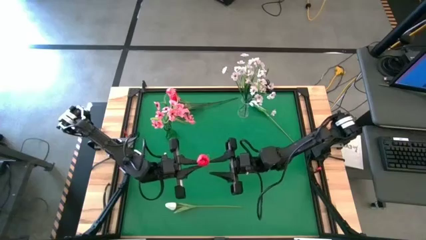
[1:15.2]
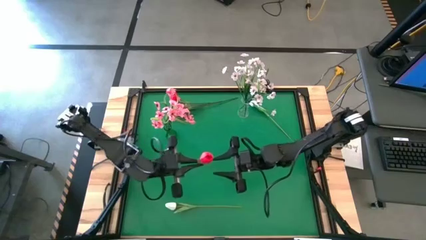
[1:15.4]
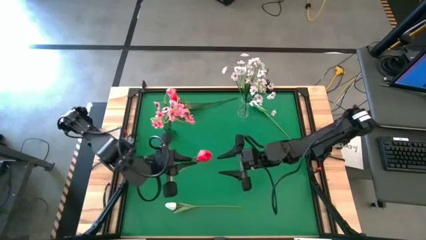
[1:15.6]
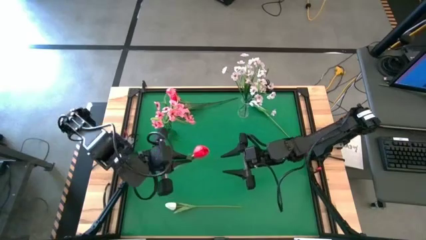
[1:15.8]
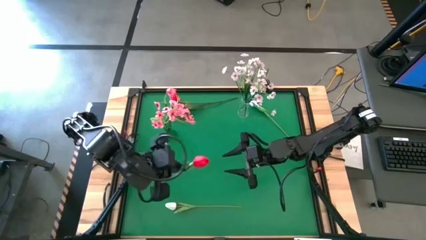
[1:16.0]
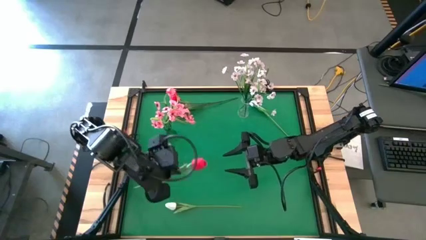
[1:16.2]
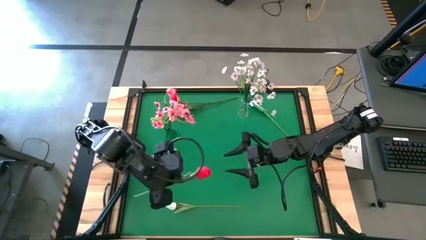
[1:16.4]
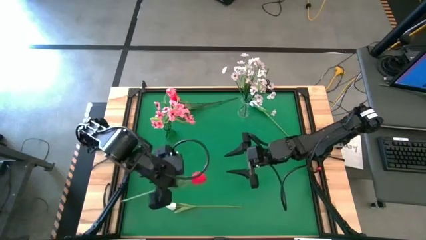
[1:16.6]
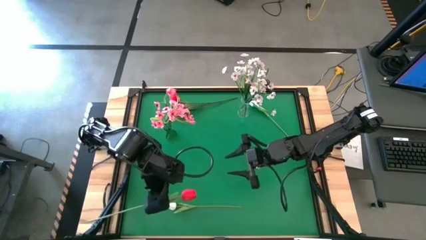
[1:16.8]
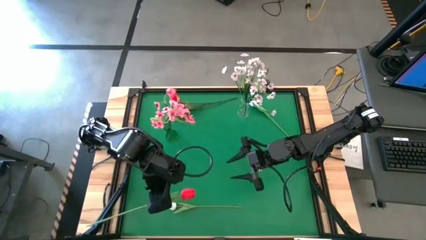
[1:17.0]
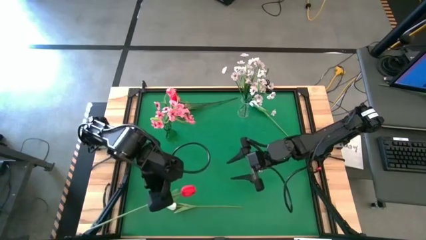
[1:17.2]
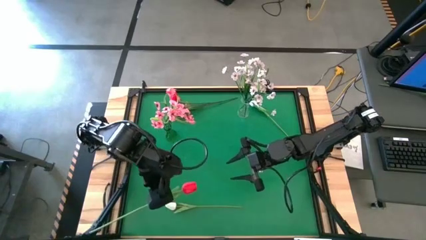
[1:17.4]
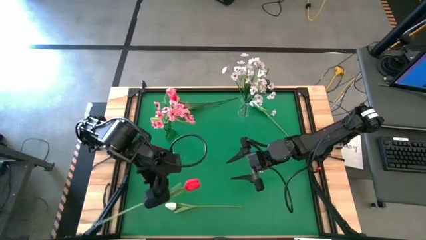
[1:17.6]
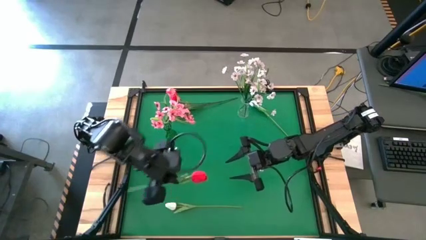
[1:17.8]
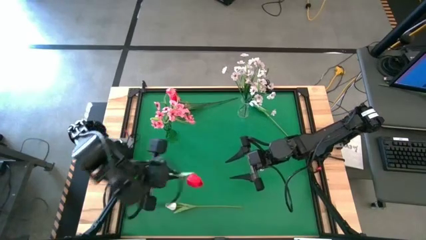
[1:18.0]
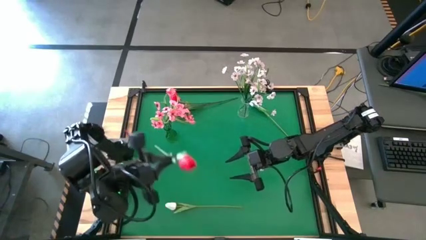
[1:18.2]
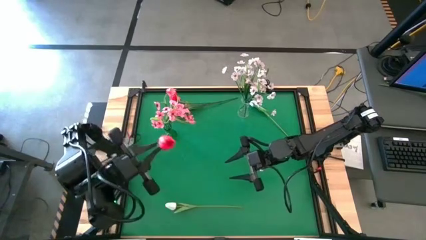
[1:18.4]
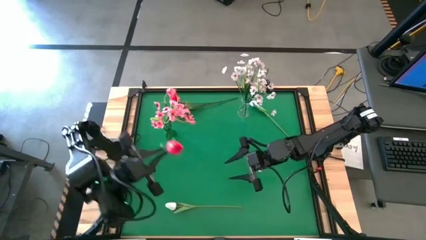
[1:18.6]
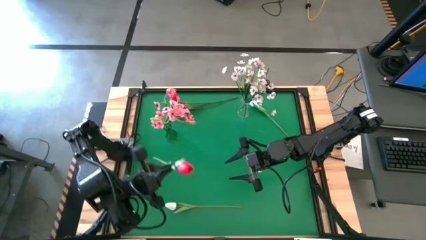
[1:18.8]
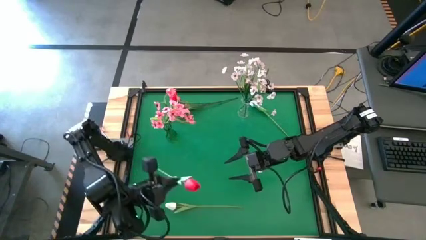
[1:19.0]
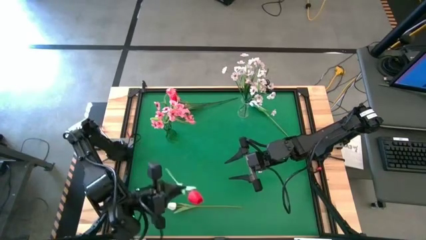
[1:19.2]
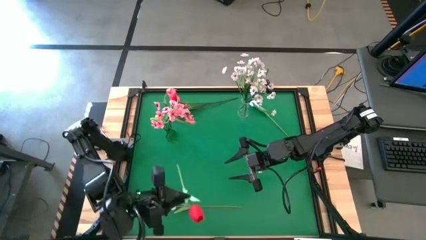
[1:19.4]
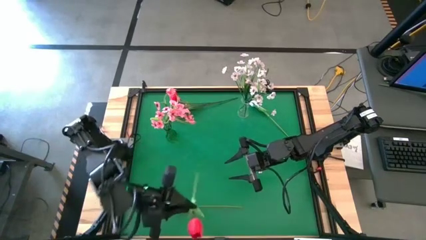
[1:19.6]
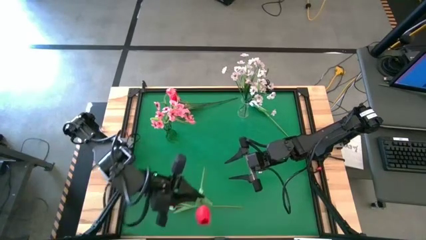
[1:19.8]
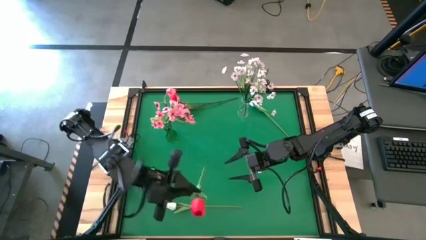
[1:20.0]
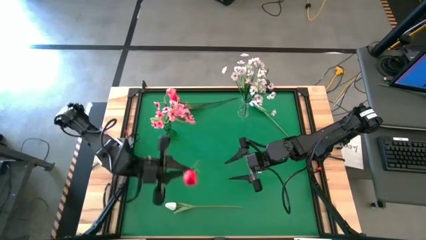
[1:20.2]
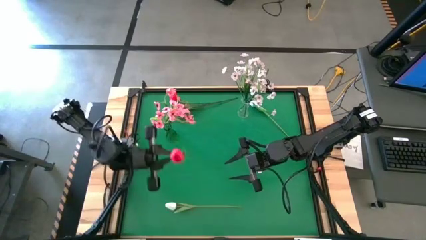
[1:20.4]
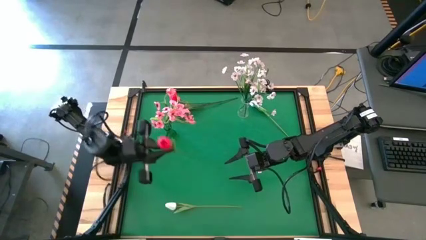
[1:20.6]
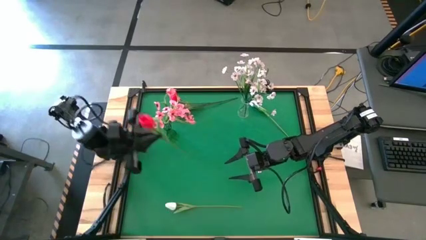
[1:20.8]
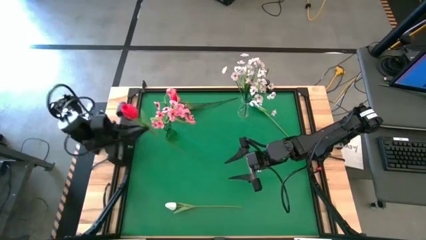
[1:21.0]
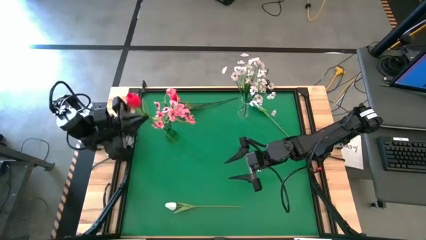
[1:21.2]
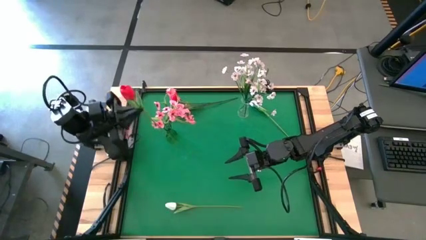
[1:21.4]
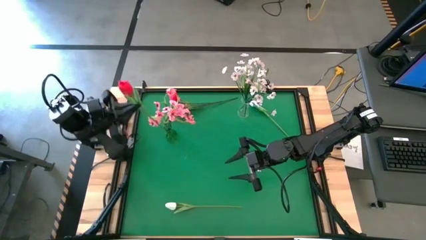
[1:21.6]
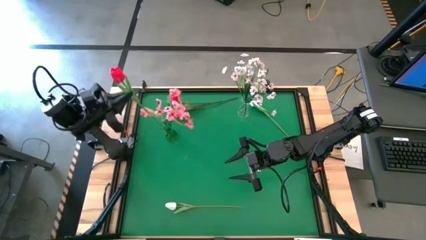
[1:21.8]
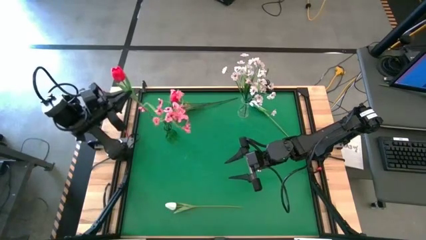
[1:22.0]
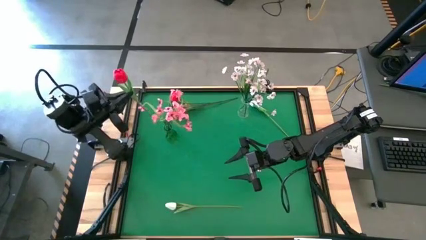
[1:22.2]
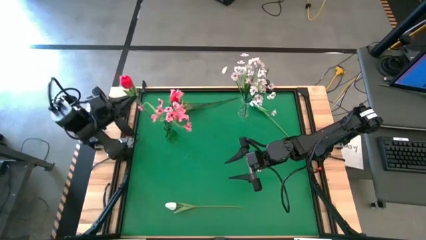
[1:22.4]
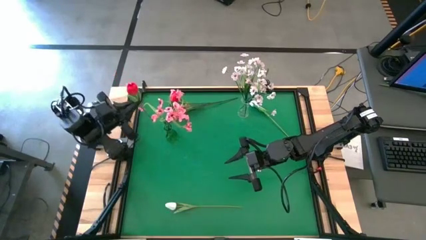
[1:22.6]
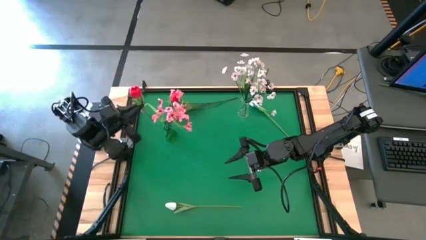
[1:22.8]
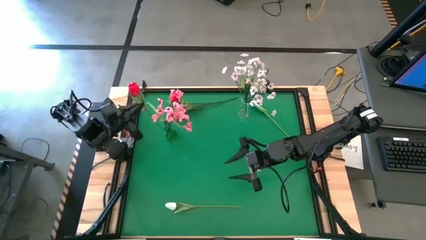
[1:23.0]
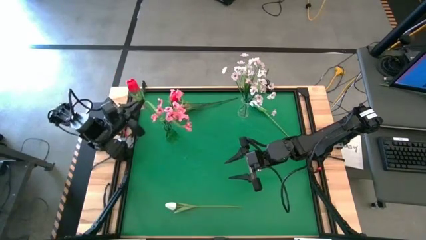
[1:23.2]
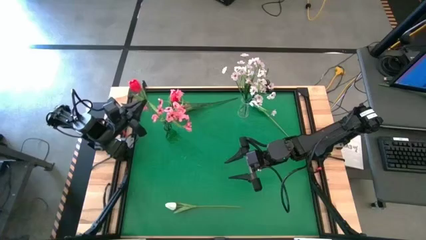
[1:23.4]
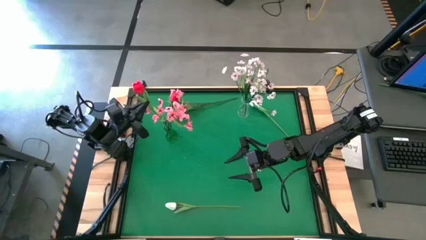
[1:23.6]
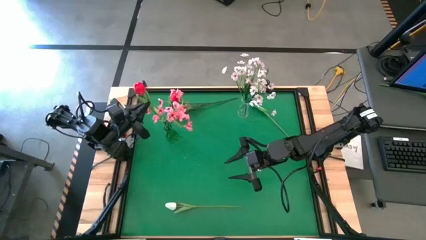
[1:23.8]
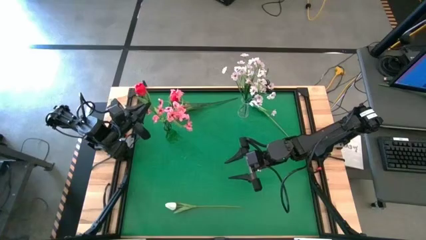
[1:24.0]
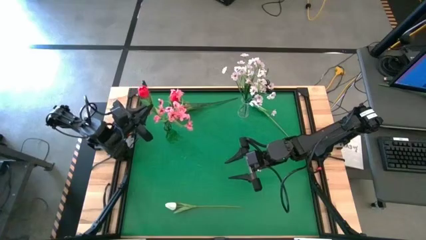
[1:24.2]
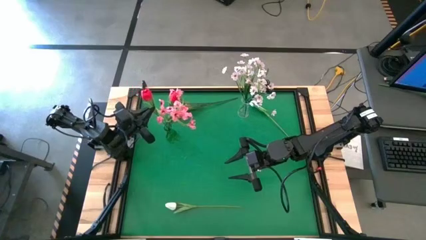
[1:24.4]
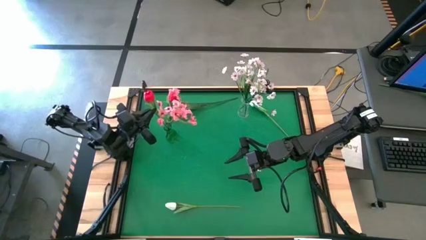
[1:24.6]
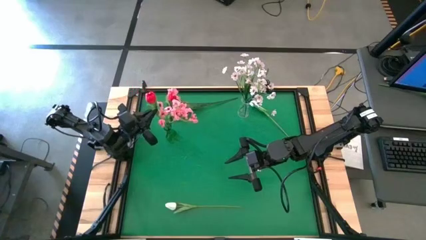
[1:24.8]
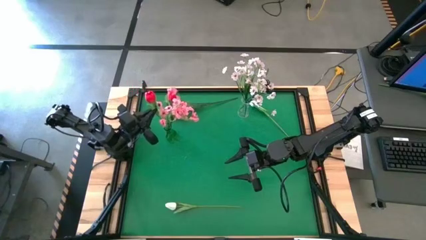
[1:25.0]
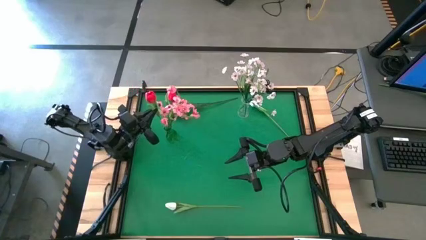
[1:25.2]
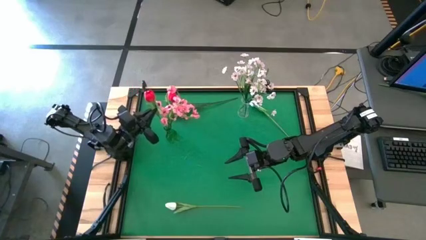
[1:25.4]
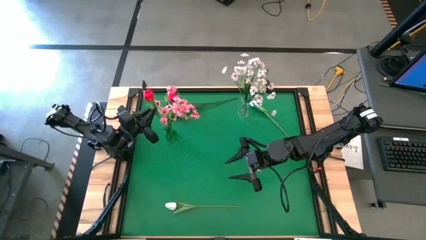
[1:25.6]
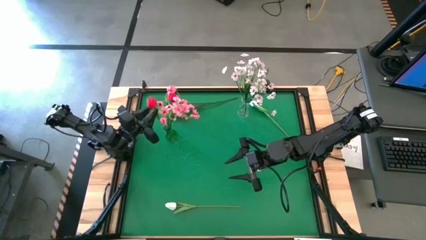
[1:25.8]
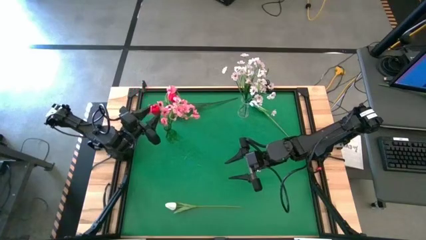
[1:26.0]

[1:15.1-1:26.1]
Task: Sort flowers into vase by color
Put the red flower into the green vase
